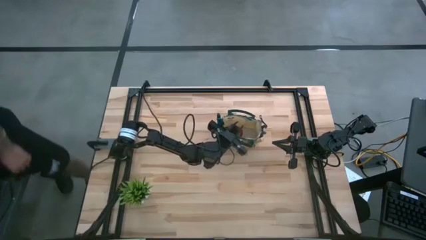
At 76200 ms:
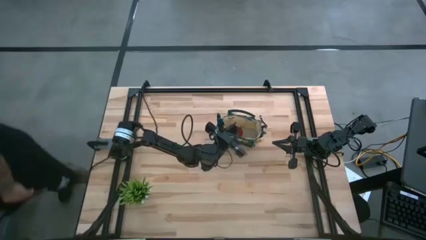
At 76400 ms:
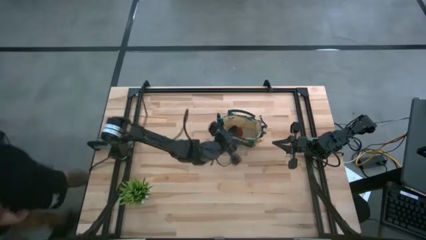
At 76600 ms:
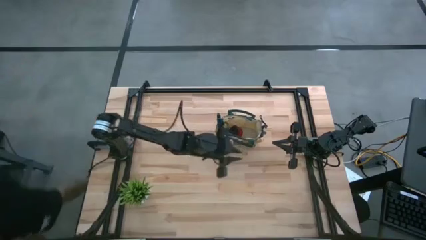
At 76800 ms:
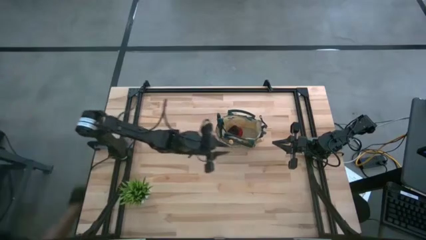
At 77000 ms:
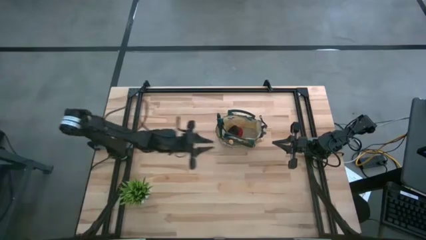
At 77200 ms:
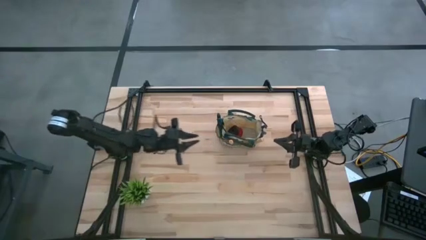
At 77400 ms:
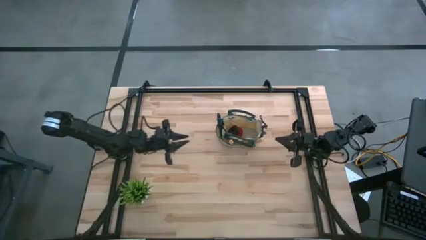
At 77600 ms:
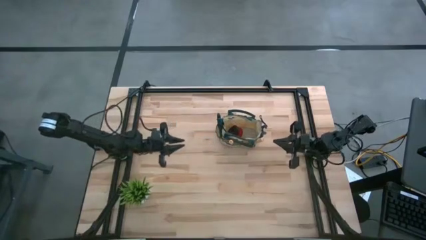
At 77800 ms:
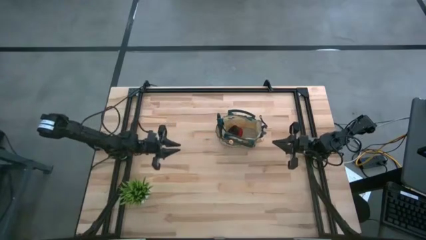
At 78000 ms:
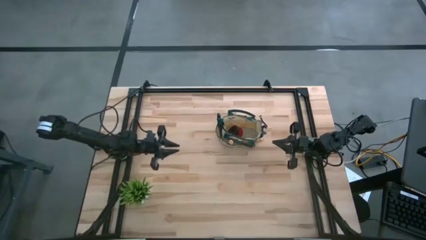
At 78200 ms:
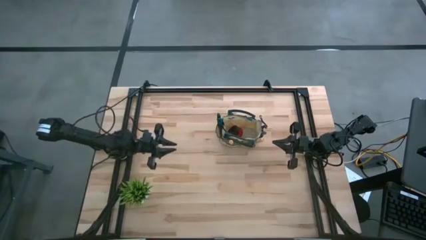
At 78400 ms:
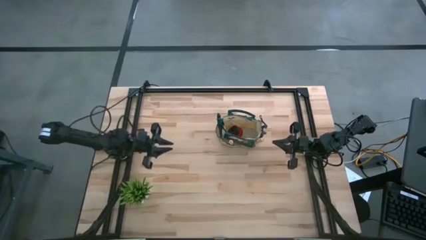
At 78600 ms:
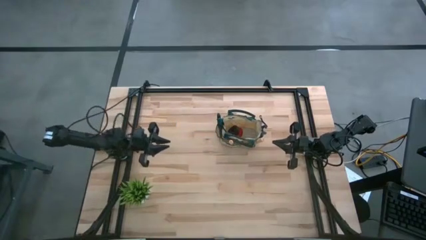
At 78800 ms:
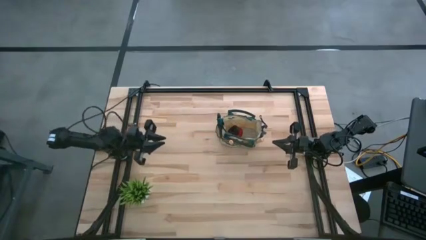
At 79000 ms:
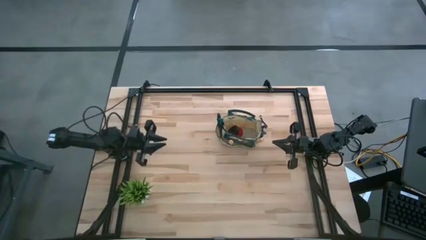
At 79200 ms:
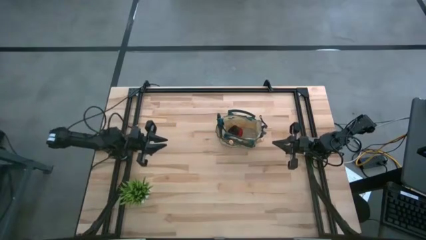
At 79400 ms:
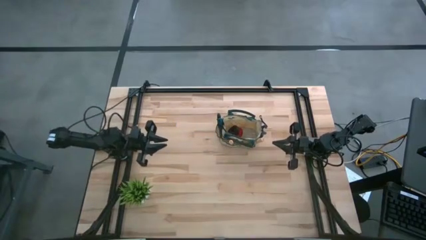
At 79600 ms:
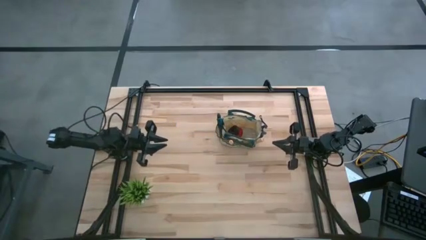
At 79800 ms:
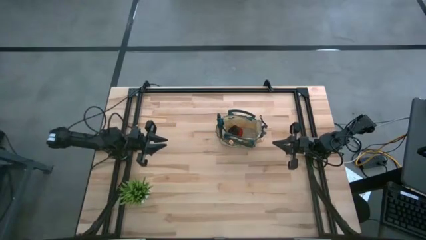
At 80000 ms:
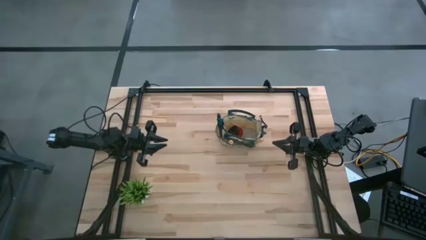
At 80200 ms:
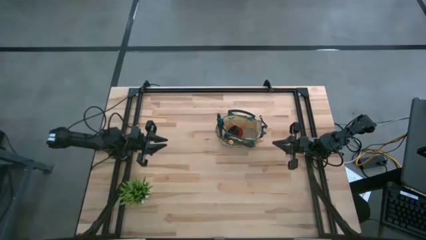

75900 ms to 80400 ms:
Task: Pick & Place Garden tools in Gardening bag
Return to Home Position

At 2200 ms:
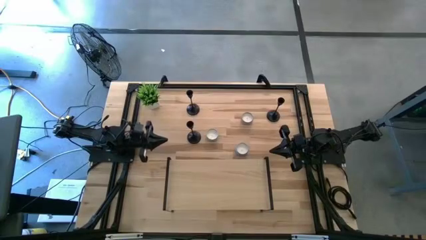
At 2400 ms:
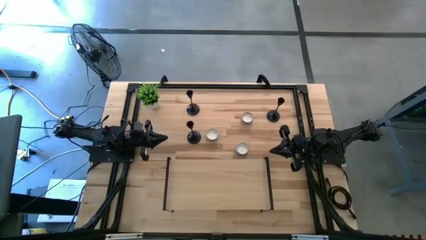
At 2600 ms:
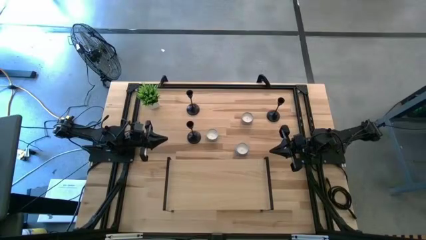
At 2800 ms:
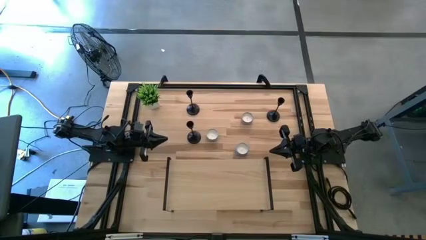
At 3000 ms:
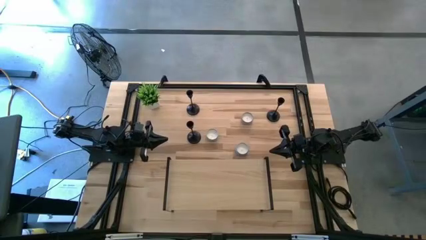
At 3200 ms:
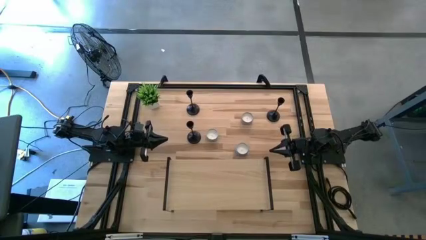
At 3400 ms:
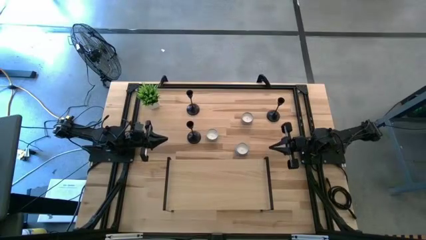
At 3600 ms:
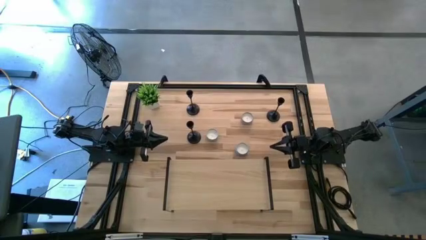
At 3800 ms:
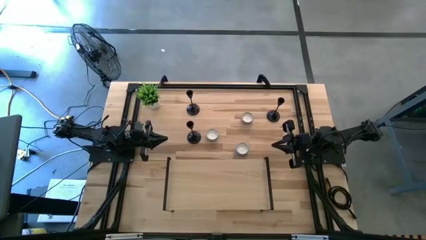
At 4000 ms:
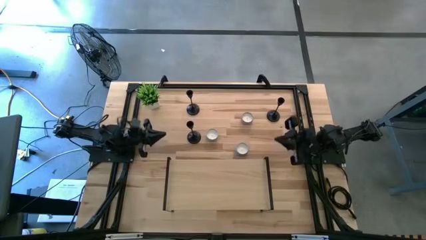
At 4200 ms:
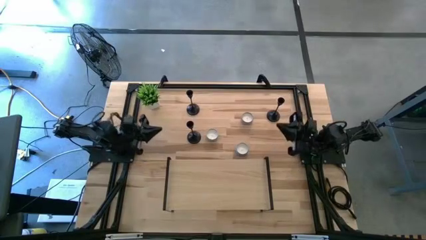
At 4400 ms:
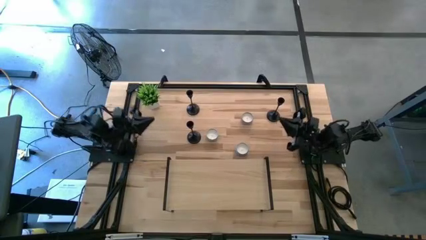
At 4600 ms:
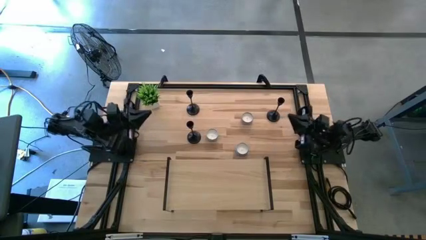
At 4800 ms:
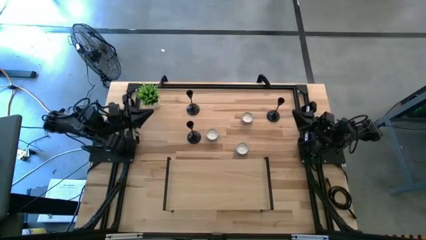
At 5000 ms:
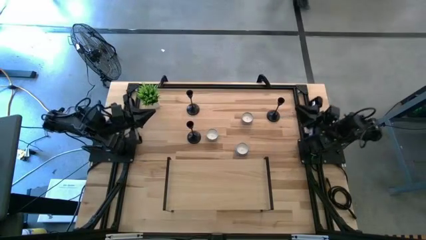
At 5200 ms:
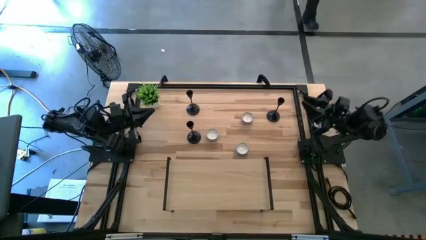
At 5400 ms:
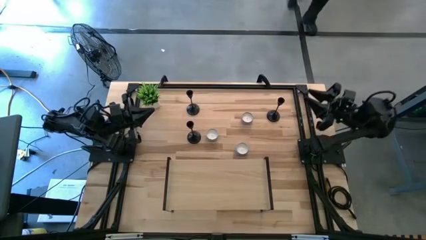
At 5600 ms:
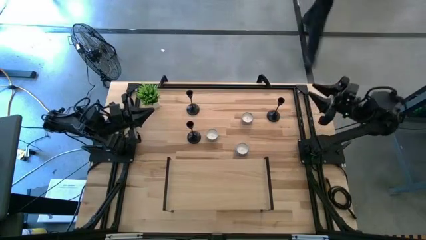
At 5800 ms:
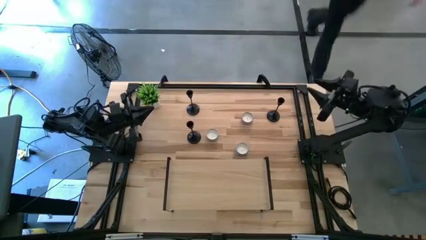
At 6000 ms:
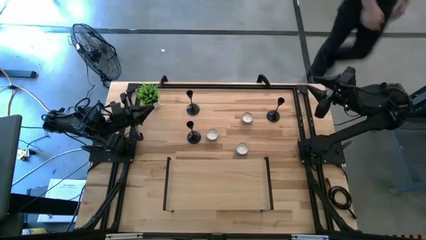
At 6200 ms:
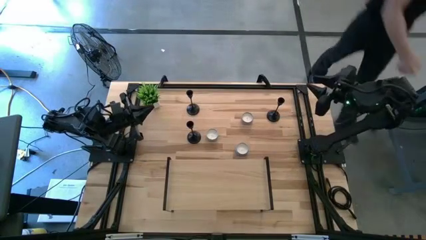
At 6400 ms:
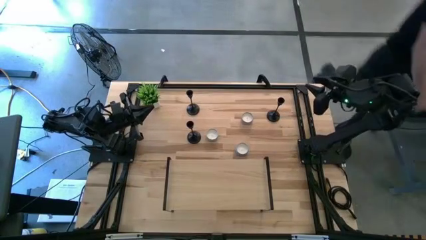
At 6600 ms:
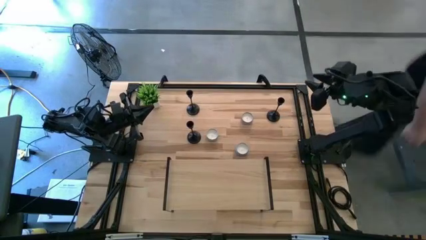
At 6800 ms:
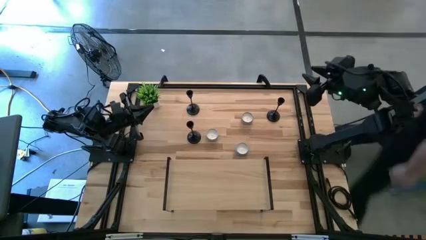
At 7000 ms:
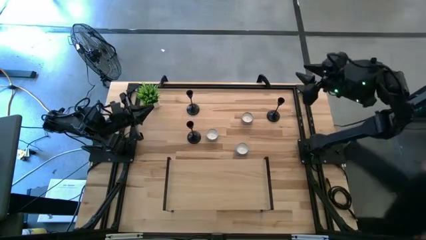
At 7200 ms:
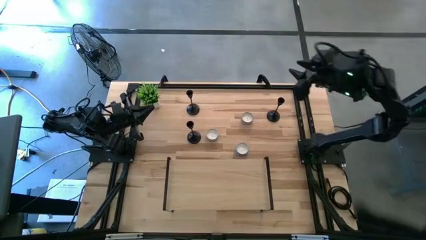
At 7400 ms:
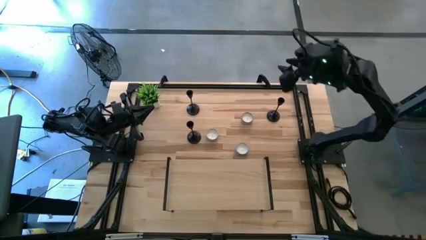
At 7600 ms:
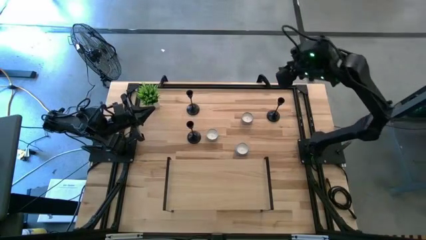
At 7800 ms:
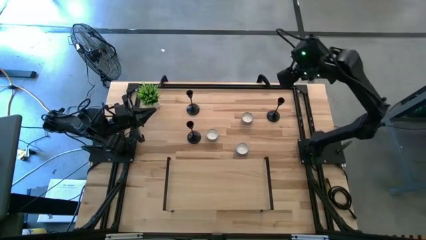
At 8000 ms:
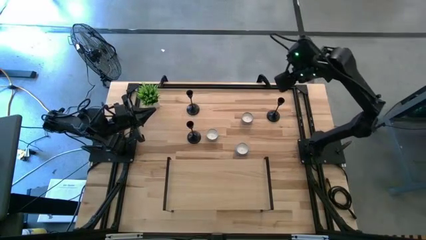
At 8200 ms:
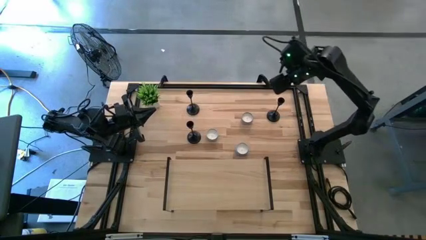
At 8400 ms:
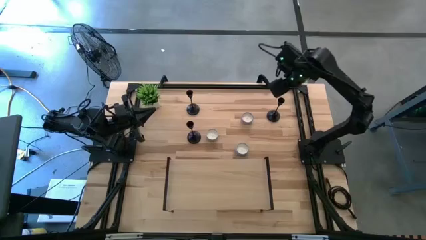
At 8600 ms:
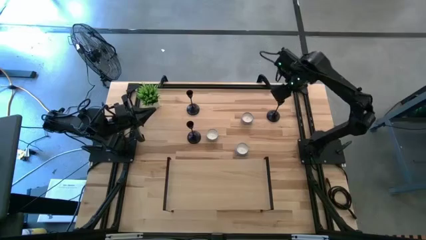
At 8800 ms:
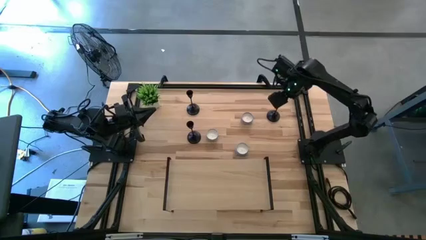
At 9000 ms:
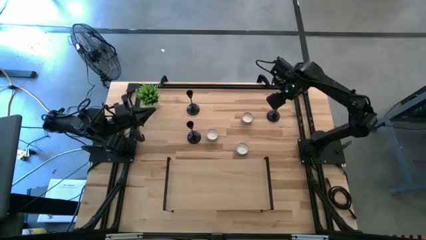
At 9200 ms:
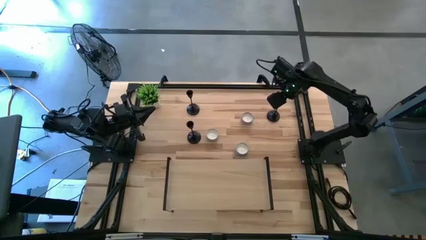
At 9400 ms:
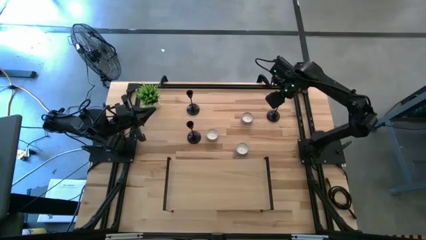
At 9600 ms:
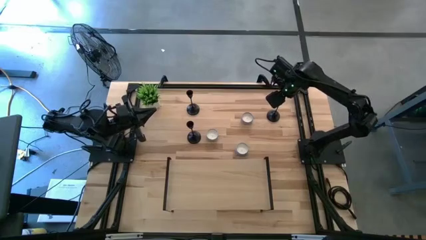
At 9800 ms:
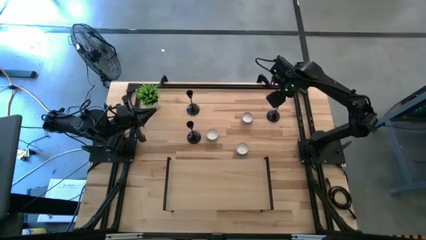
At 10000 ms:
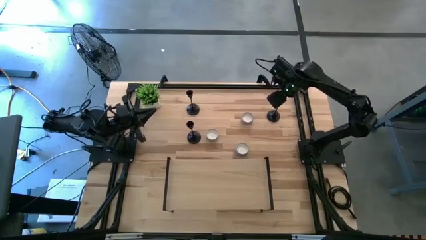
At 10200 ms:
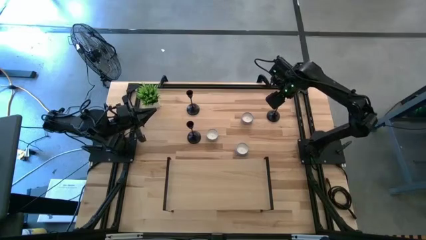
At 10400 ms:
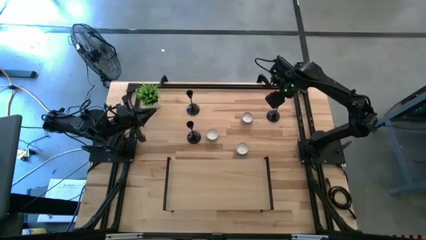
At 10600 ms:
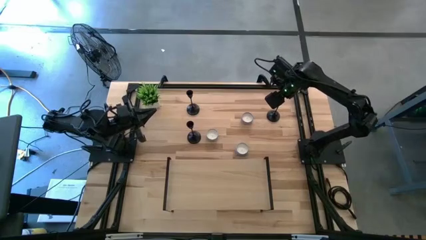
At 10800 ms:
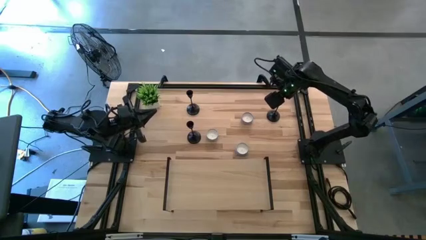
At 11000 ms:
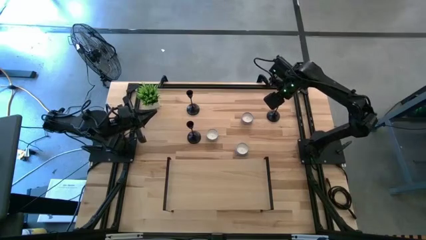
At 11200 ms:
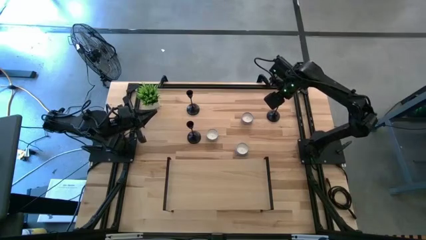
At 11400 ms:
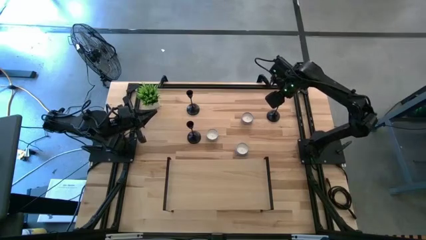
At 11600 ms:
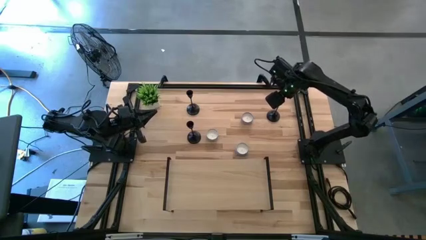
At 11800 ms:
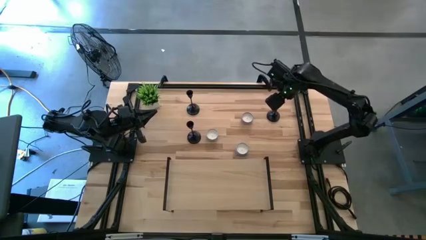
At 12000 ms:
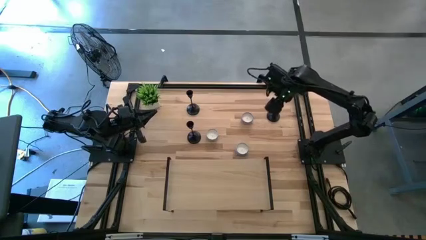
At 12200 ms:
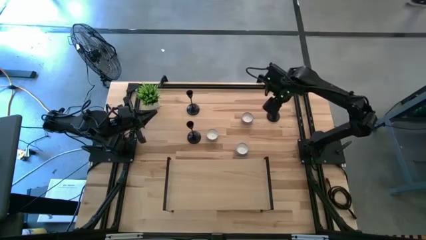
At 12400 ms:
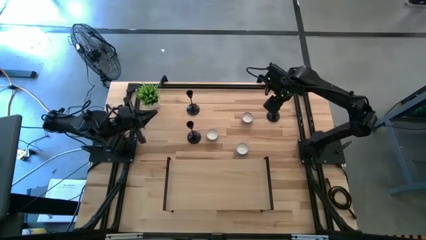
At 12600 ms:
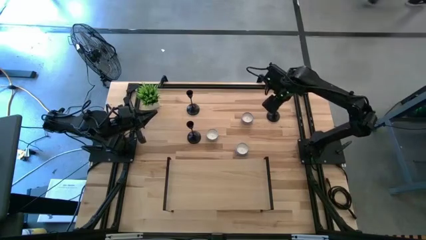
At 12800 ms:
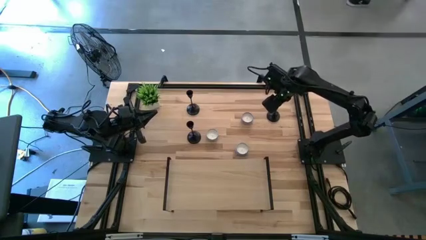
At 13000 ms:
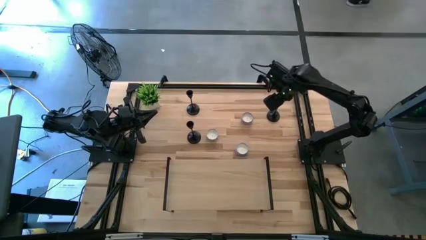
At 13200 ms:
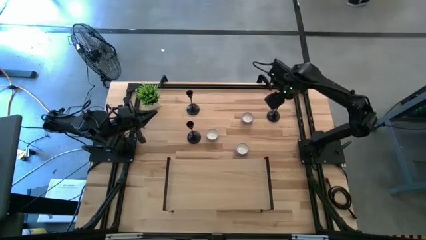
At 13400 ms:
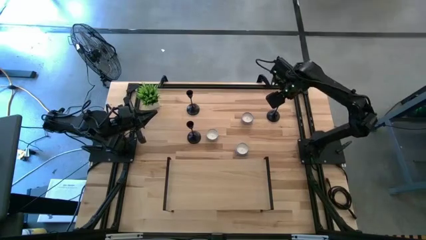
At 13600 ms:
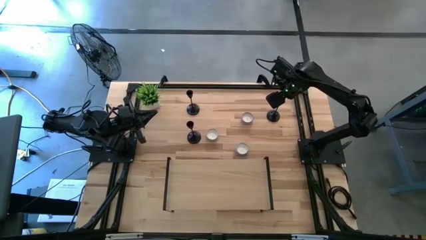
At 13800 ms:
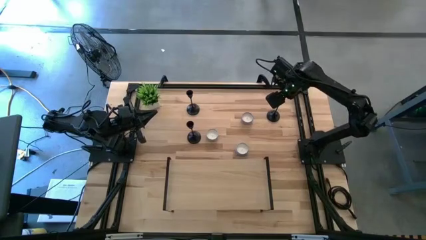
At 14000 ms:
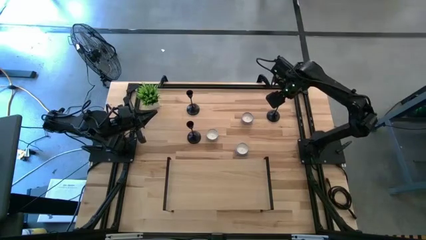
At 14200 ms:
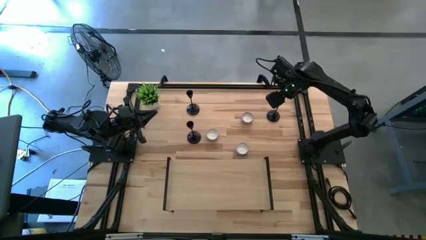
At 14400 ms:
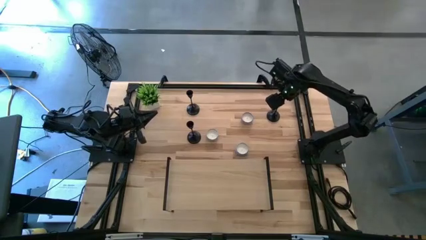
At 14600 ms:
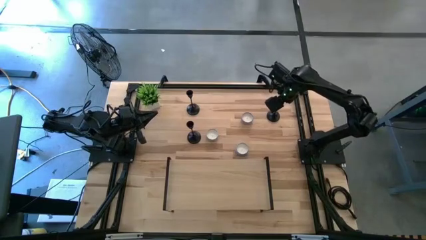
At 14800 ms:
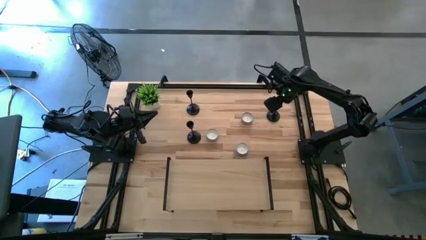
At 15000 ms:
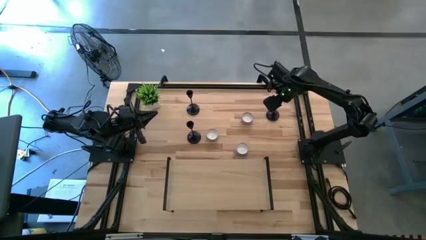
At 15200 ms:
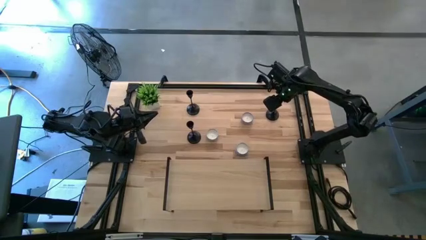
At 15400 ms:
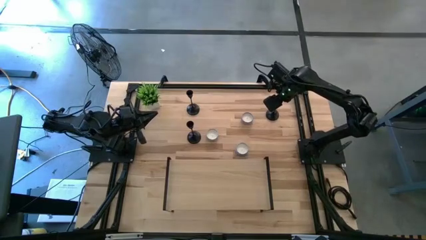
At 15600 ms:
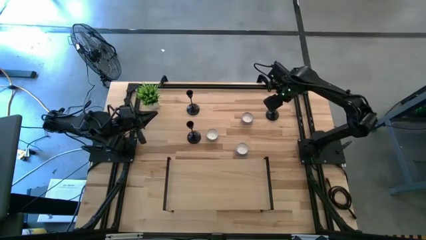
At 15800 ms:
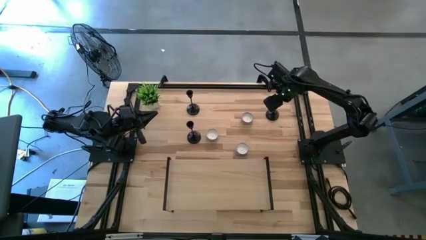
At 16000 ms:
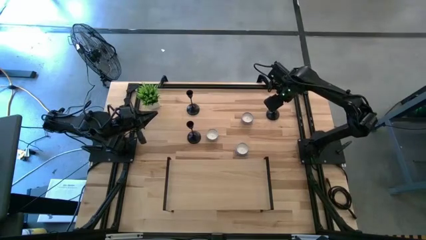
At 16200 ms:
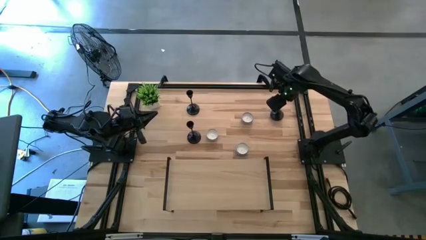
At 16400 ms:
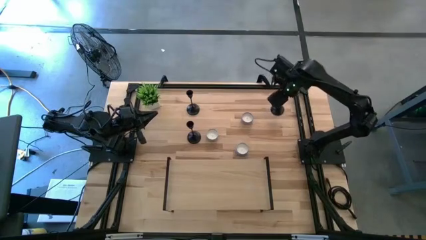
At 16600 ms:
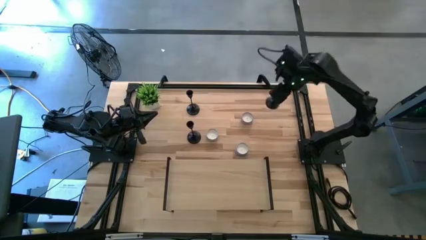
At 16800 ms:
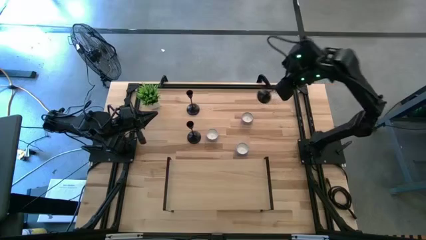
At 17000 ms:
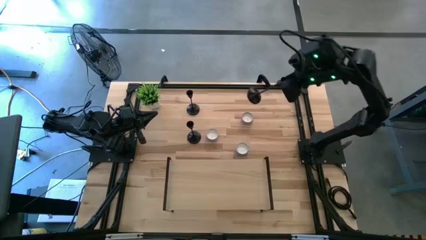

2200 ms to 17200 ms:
Task: Pick & Place candle stick holders
Put the top right black candle holder on the shelf
